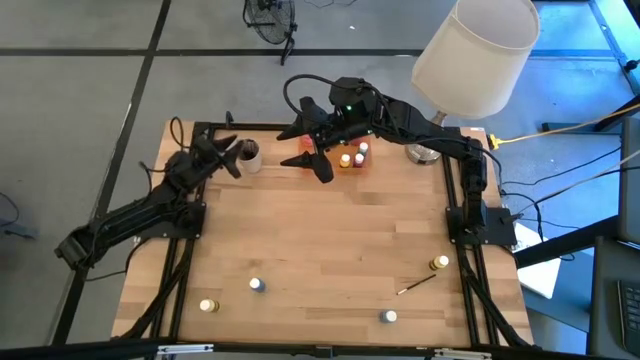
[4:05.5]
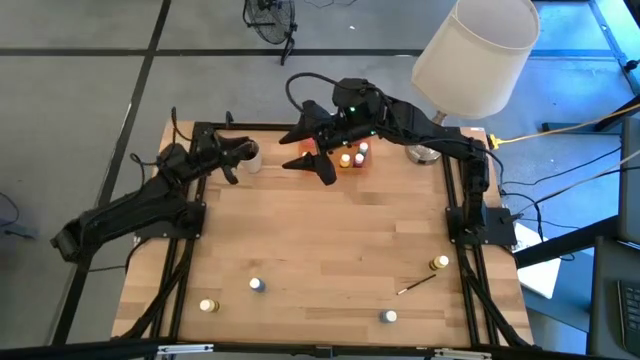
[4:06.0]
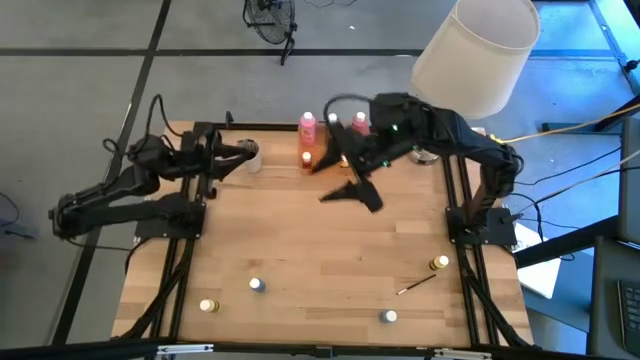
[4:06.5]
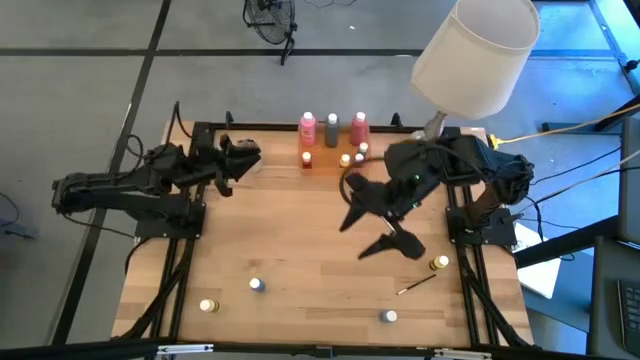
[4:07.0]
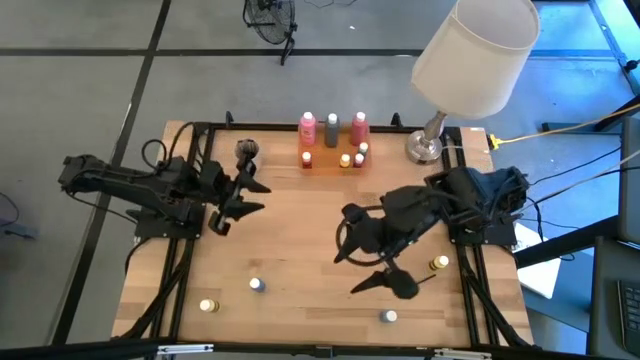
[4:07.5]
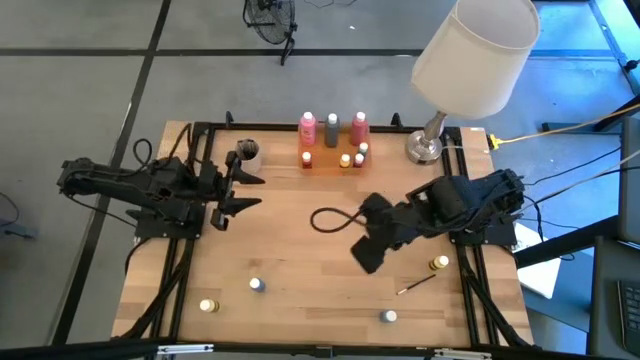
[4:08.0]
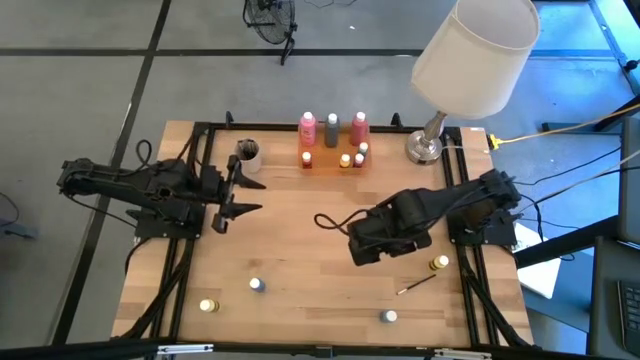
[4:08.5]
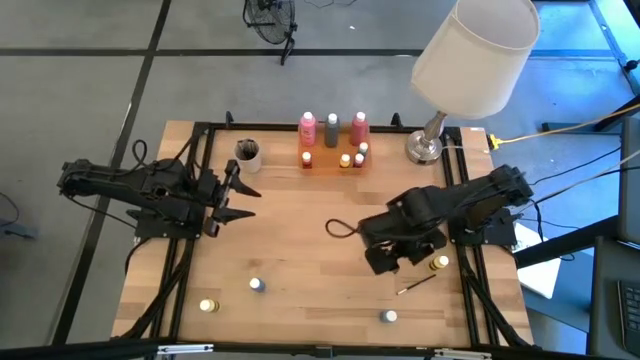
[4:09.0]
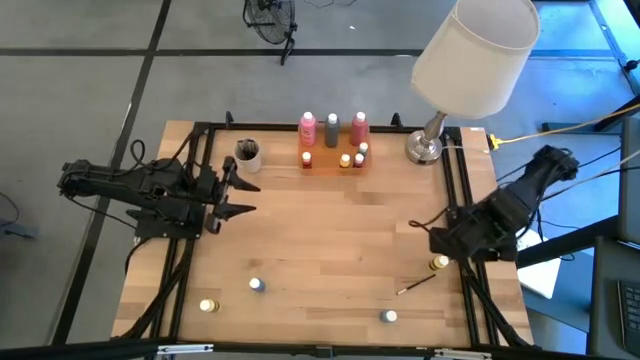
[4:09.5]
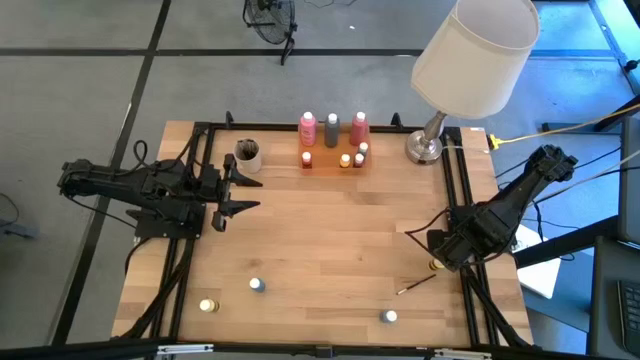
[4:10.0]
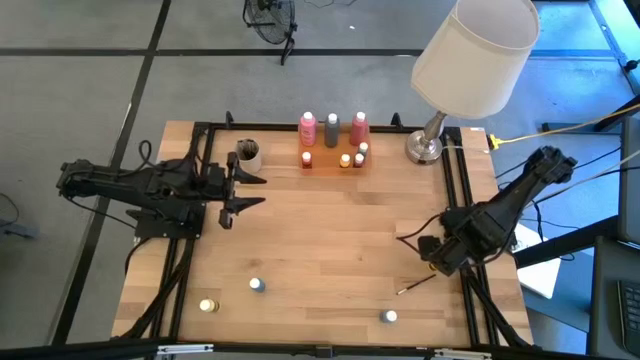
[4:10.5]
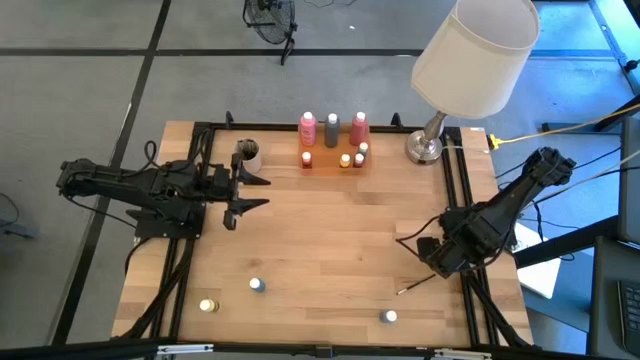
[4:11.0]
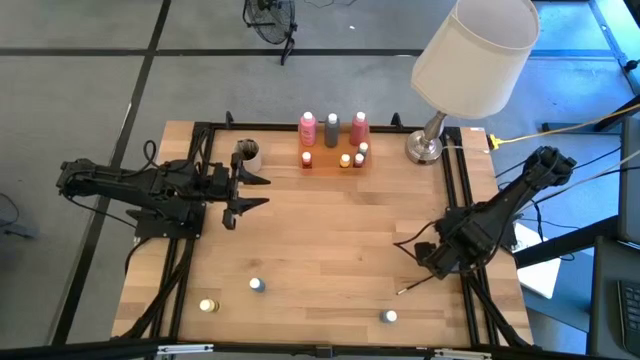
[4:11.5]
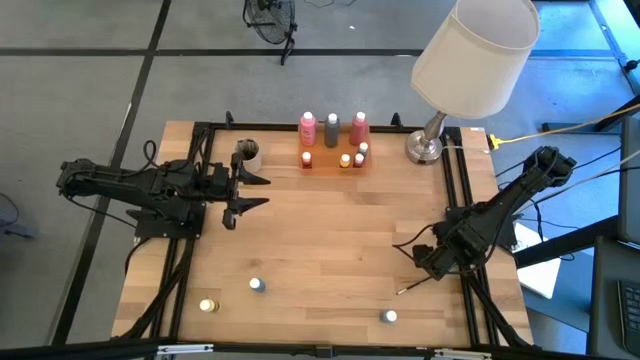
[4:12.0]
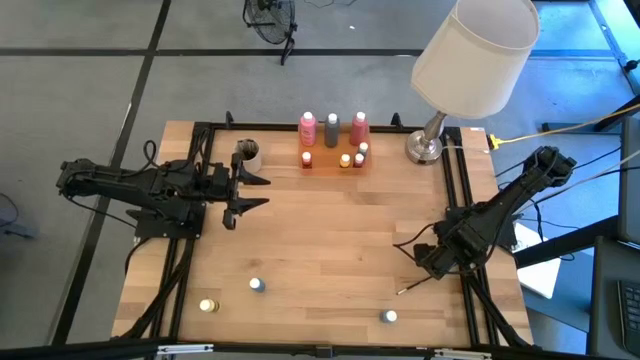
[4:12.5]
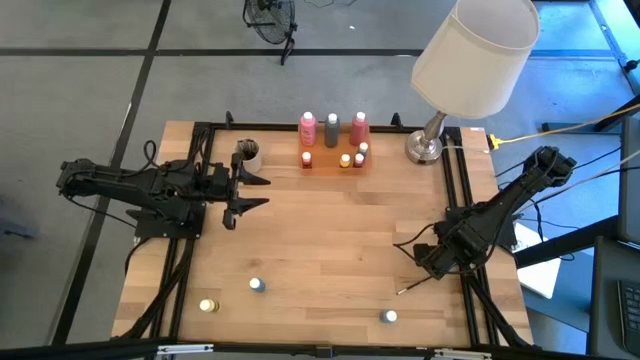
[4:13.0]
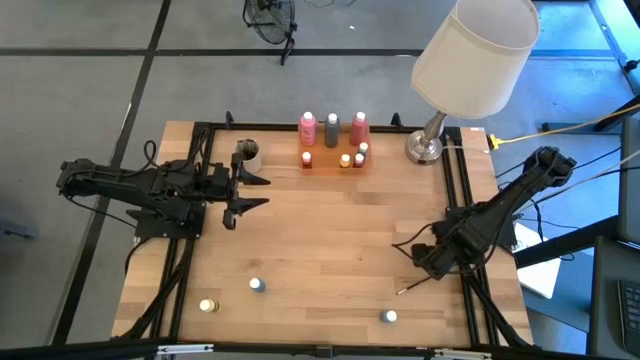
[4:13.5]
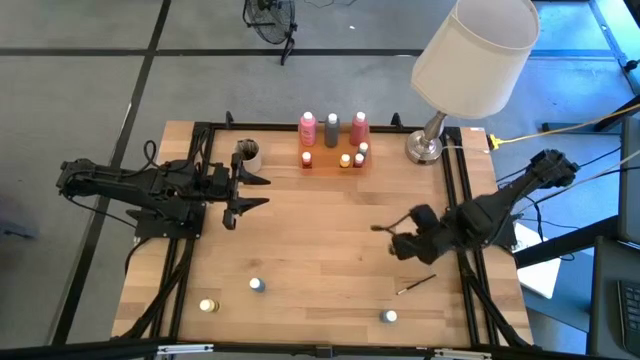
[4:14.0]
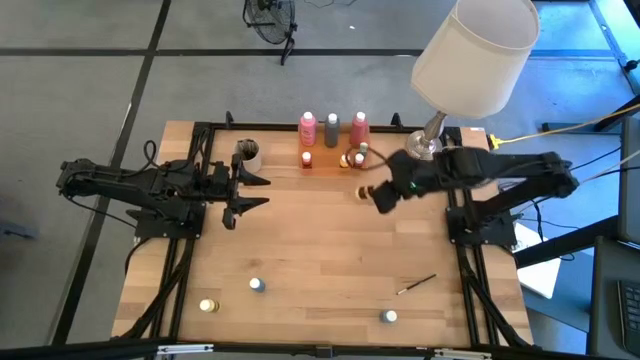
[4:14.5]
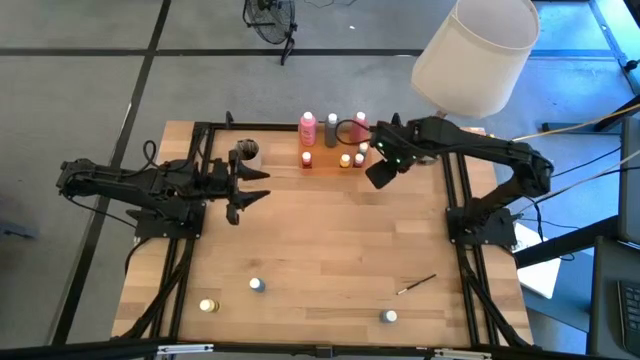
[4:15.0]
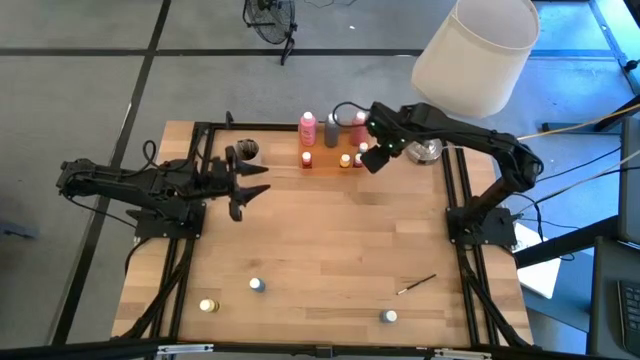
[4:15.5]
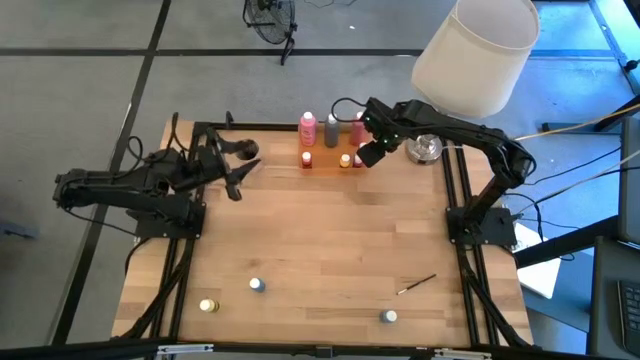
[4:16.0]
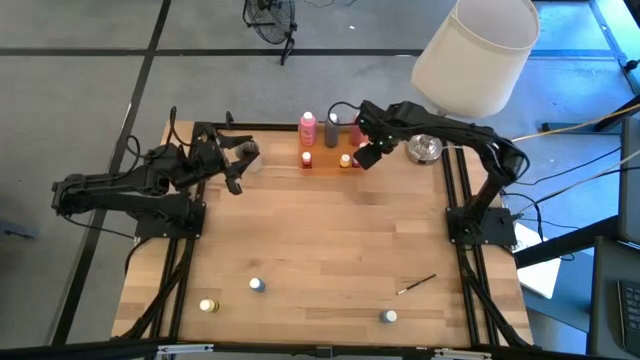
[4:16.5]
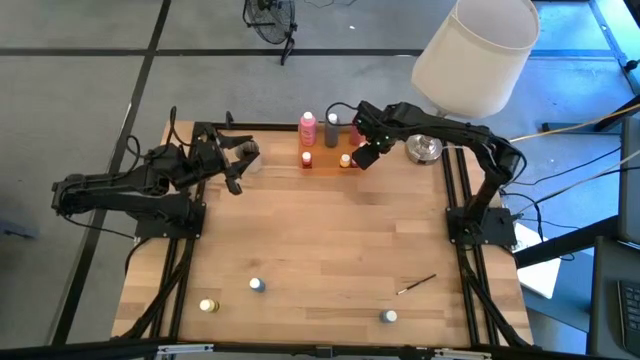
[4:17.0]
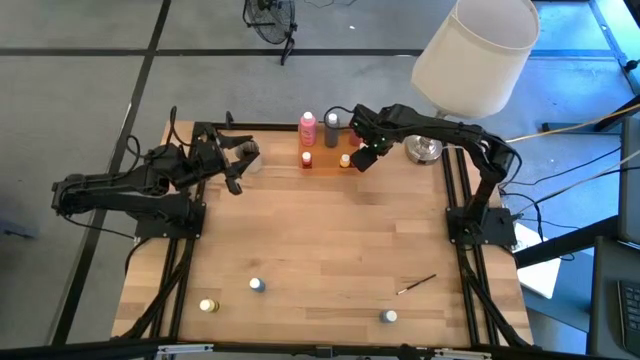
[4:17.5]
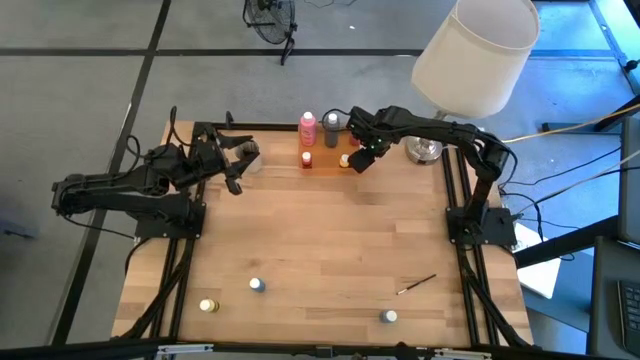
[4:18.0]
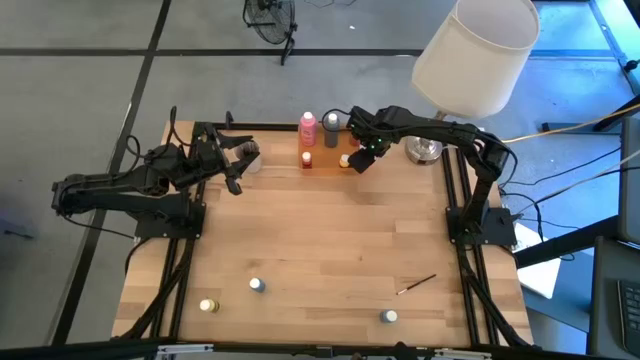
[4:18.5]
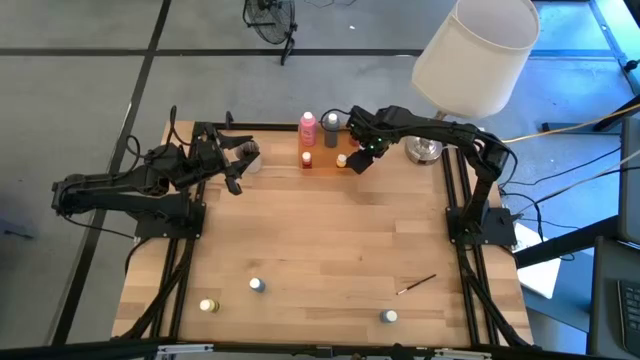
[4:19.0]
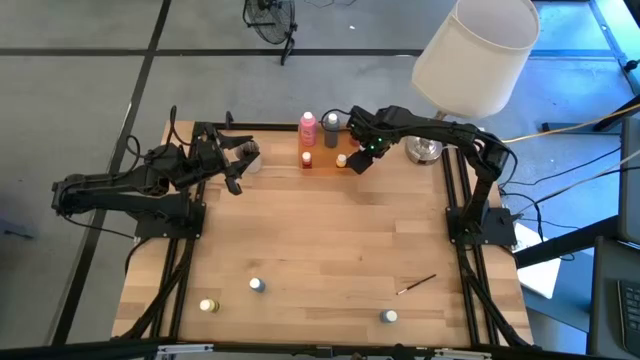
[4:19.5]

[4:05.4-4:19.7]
Task: Pick & Place Paint Supplies
Put the light yellow paint bottle into the orange bin

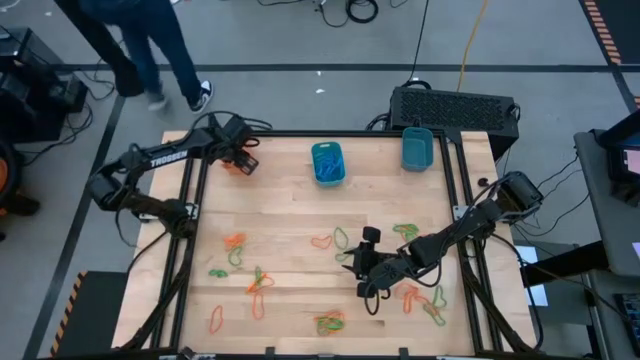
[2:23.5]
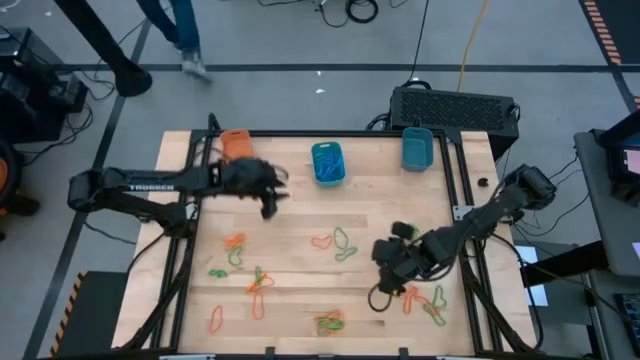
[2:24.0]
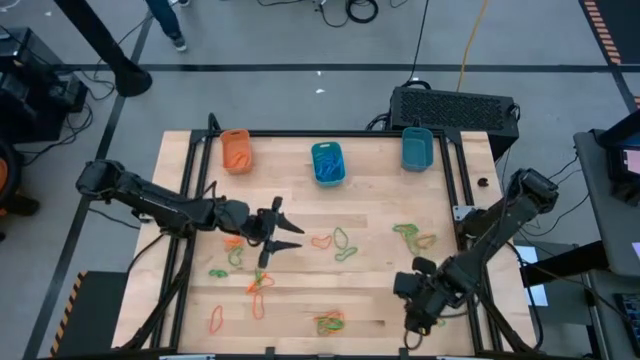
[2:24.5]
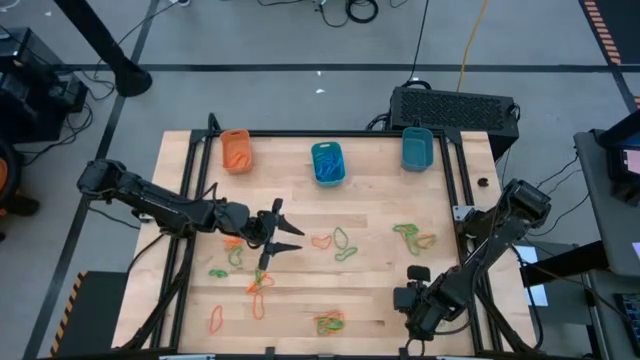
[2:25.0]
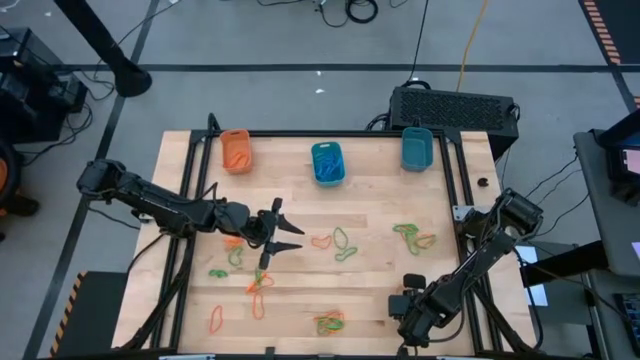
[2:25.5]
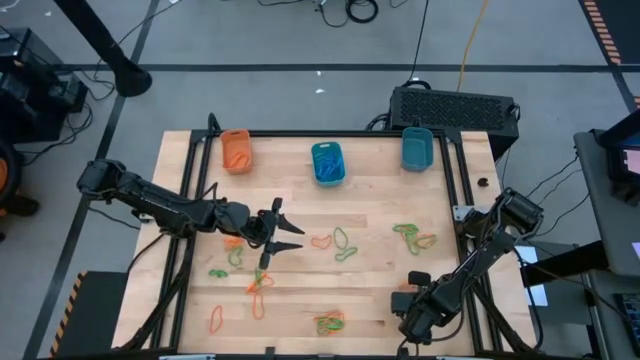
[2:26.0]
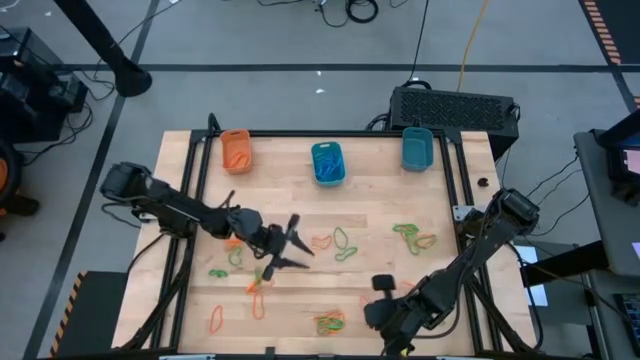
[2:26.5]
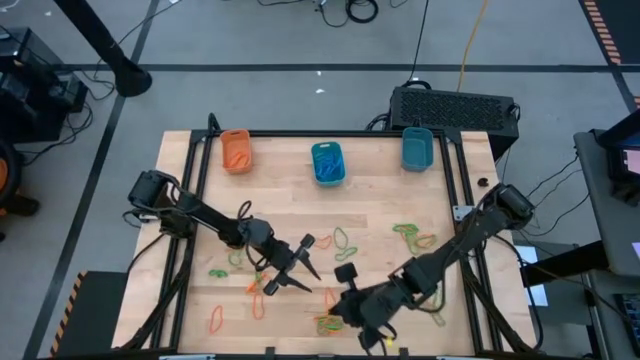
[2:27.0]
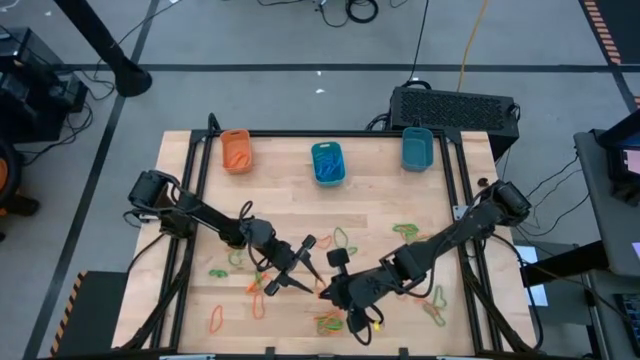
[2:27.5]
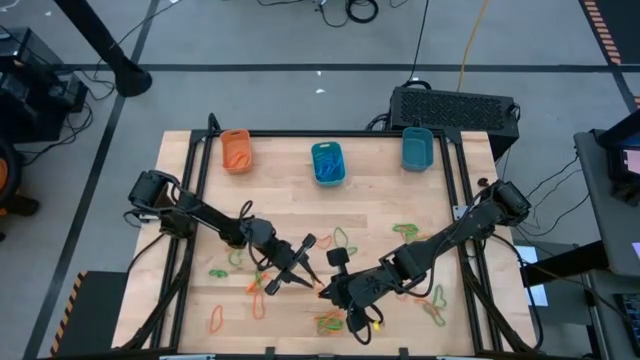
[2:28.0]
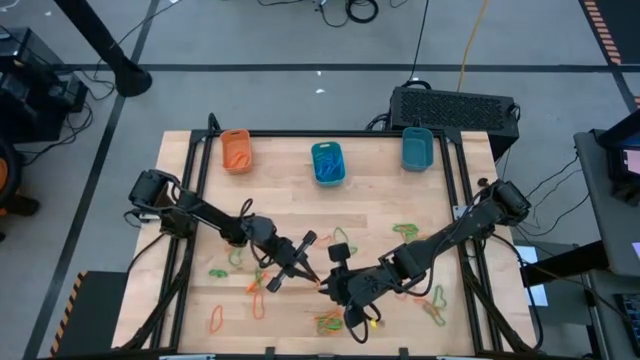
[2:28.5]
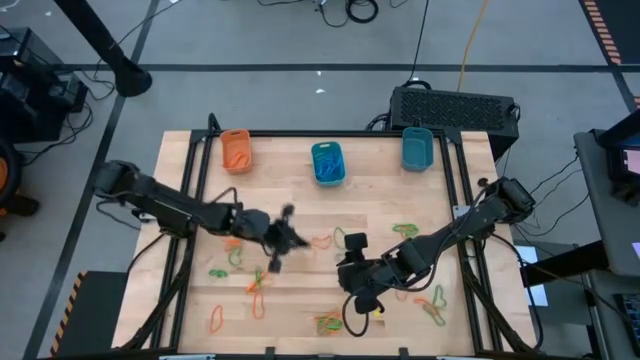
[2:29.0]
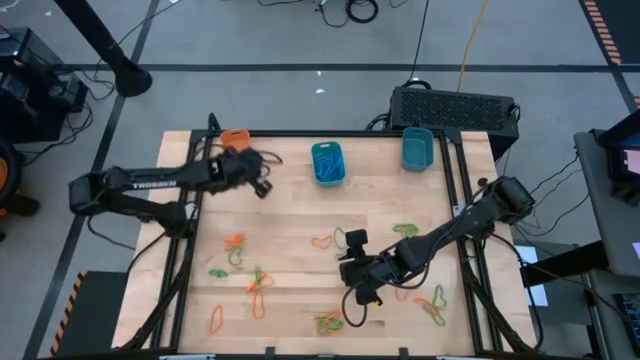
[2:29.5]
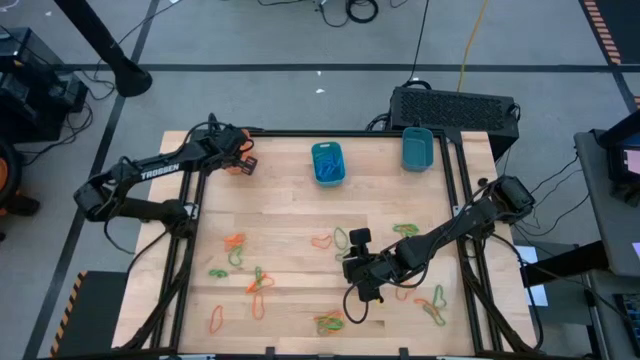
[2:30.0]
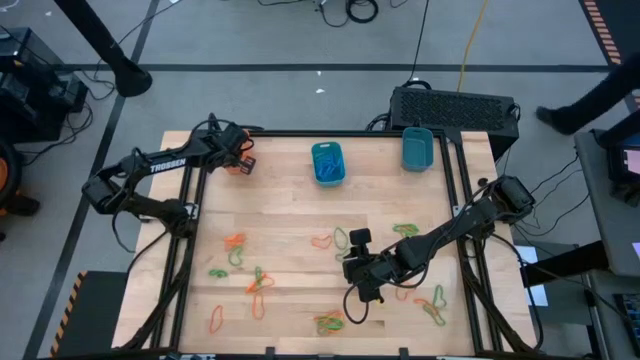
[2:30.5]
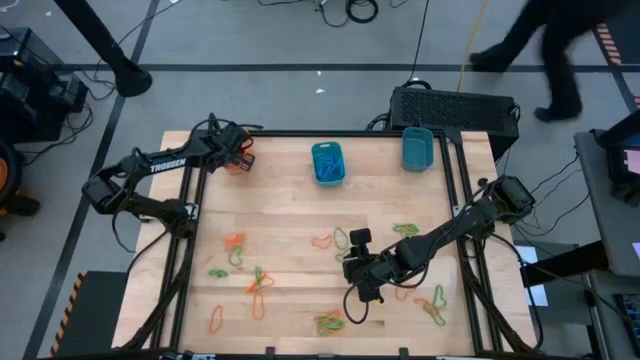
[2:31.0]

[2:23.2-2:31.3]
Task: Sort rubber bands into baskets
Put the orange rubber band into the orange bin
